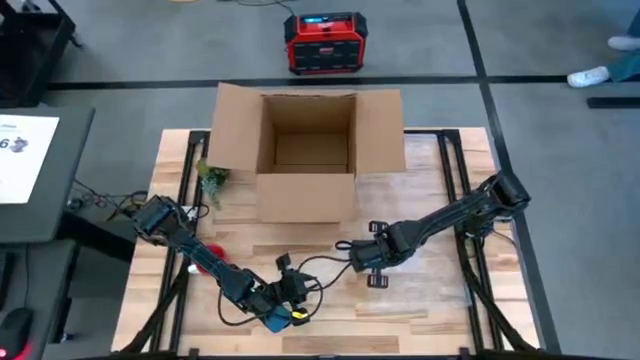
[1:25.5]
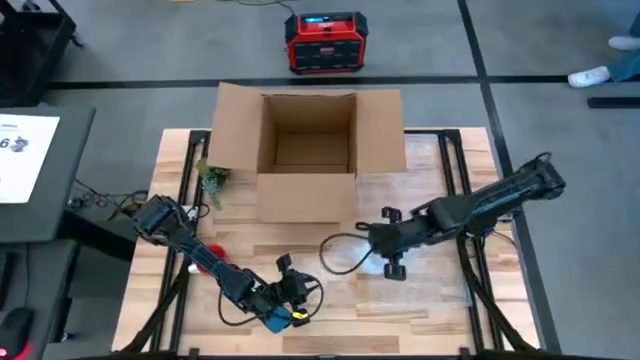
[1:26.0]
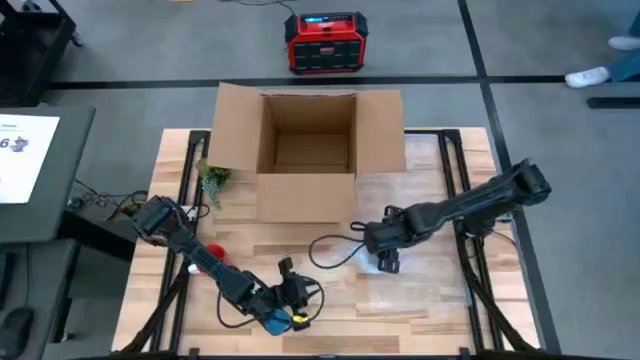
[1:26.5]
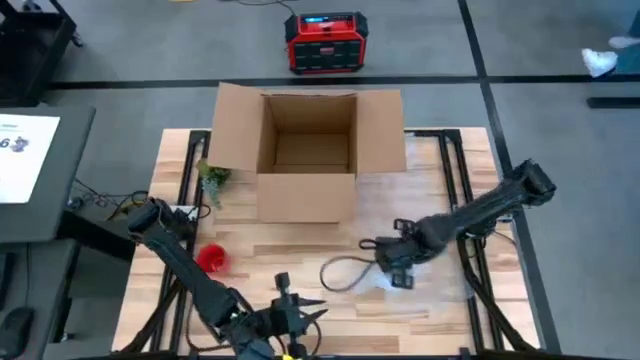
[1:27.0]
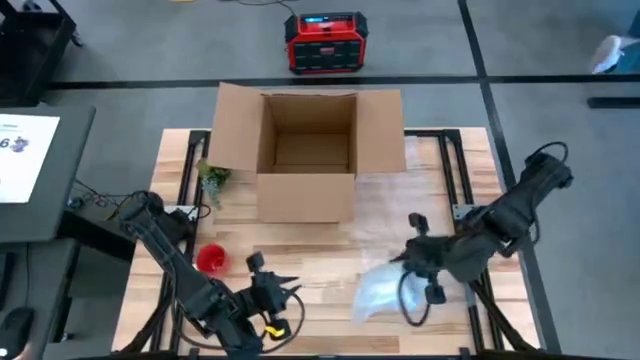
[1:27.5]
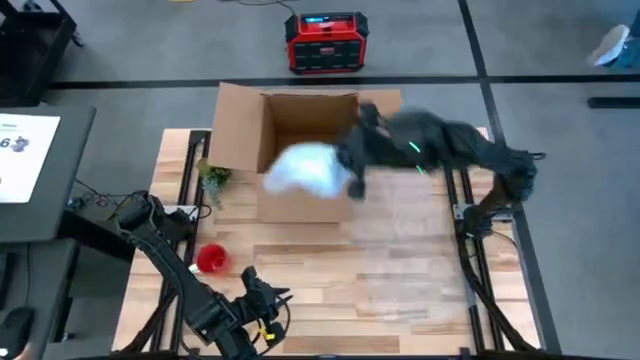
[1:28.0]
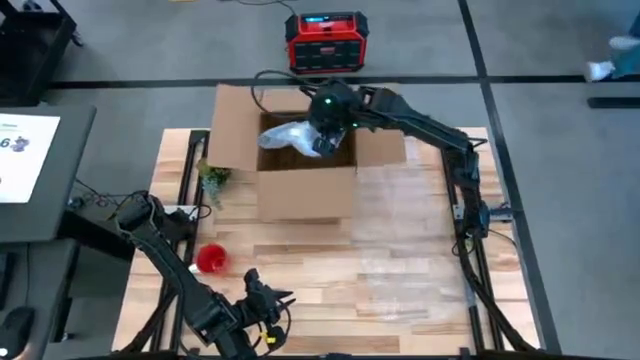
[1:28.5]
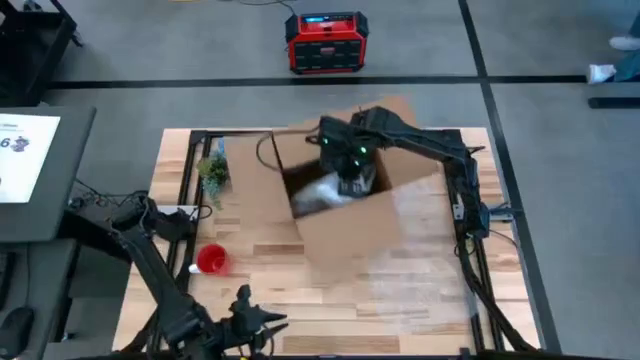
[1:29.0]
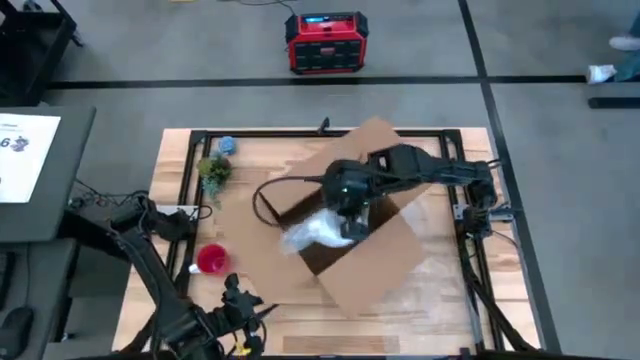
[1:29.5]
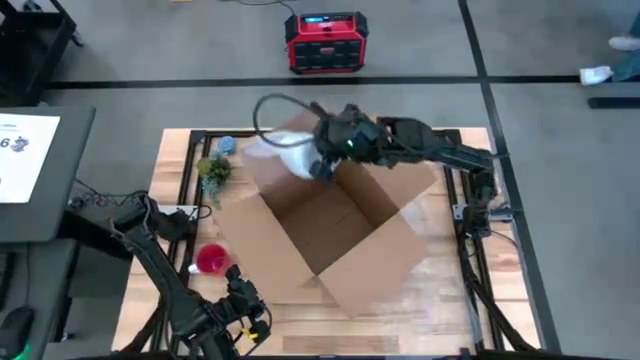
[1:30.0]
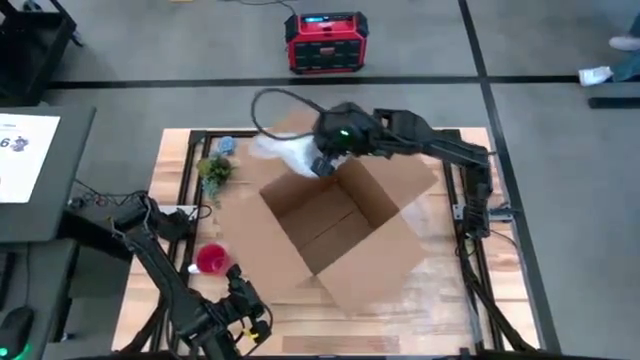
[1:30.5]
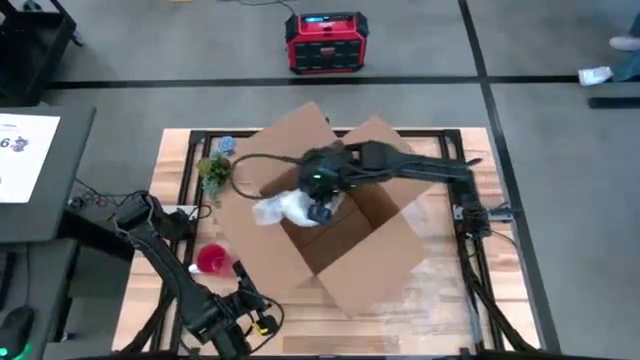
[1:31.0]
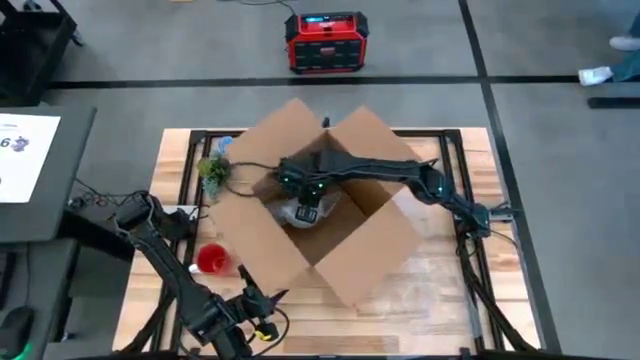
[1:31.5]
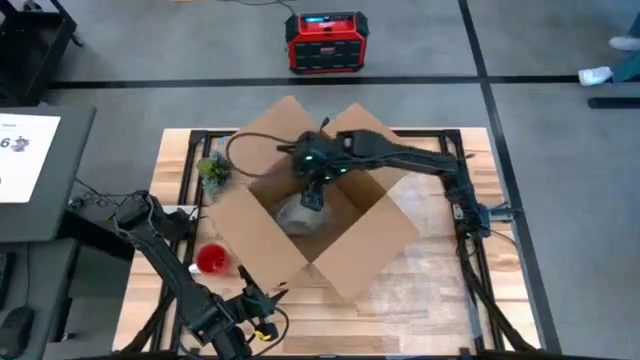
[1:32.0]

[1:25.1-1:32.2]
Task: wrap mug
Put the wrapped white mug into the box

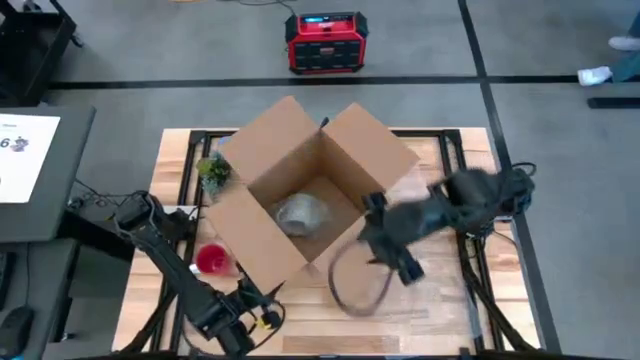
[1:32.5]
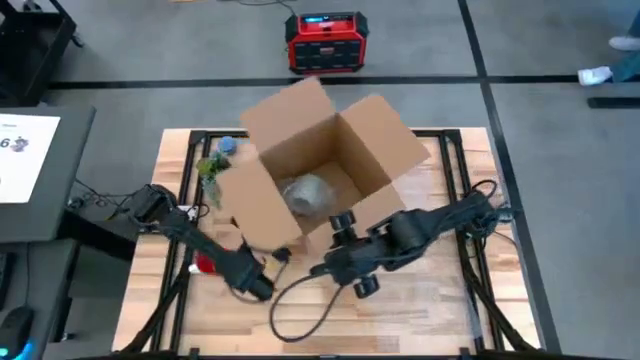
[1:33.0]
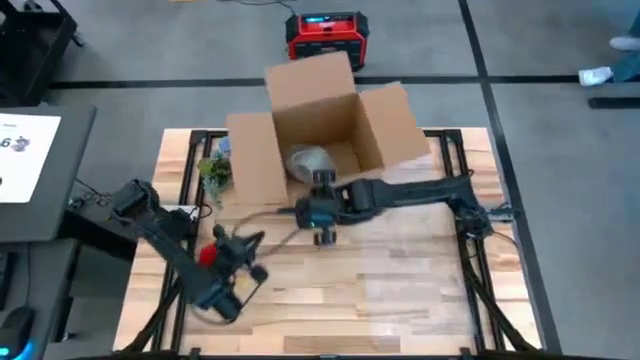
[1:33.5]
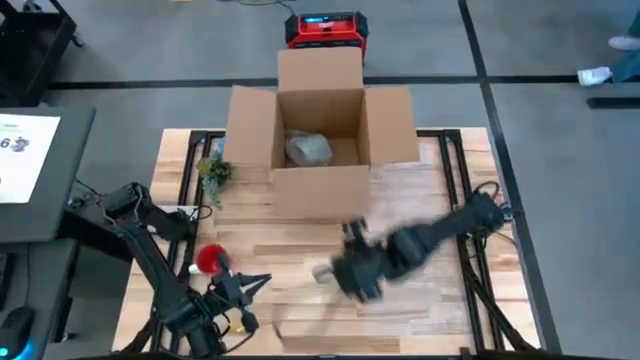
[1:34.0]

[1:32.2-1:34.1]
Move the box to the top

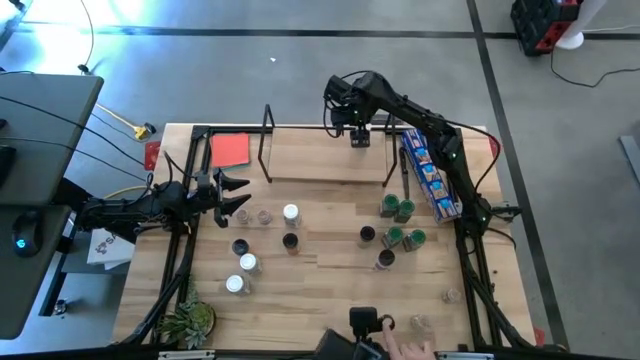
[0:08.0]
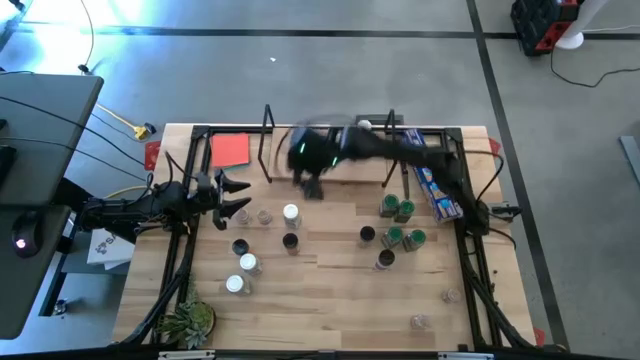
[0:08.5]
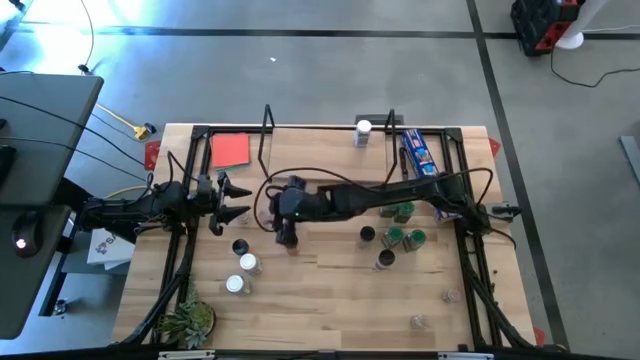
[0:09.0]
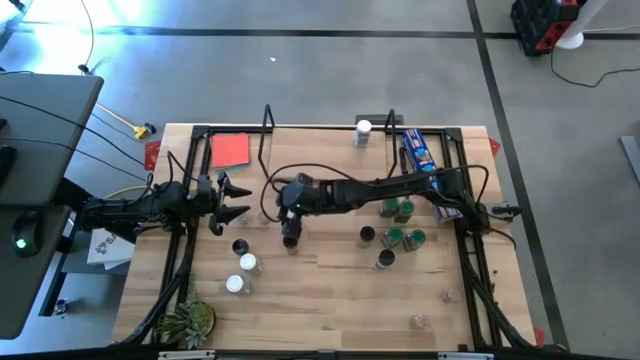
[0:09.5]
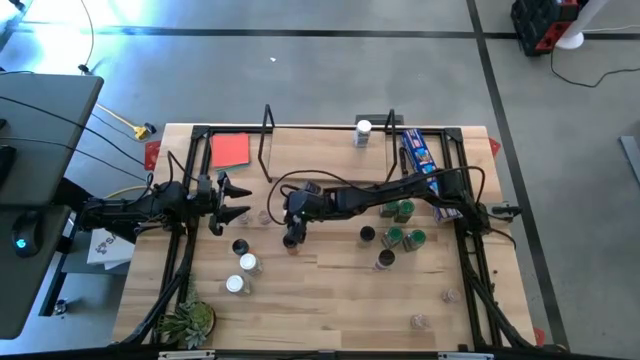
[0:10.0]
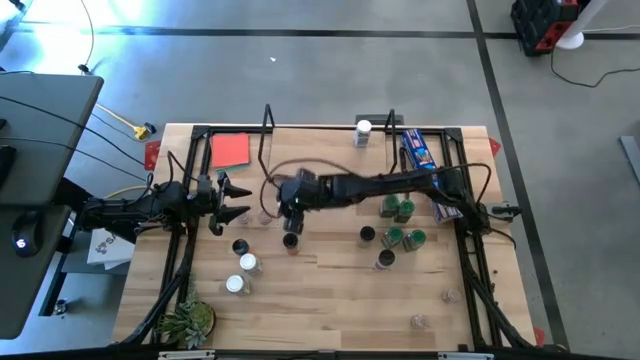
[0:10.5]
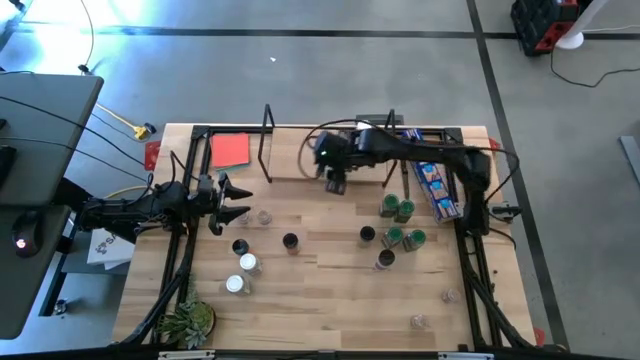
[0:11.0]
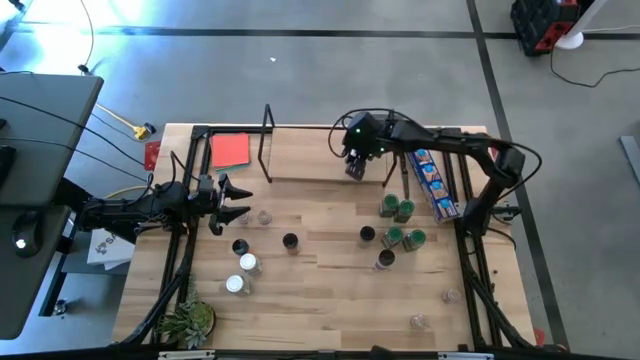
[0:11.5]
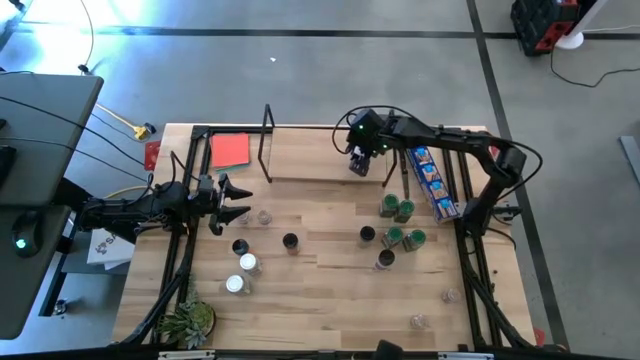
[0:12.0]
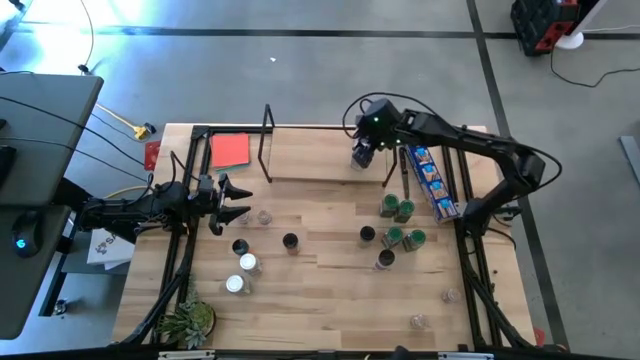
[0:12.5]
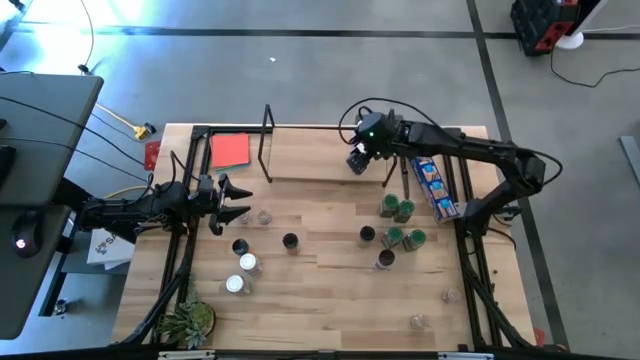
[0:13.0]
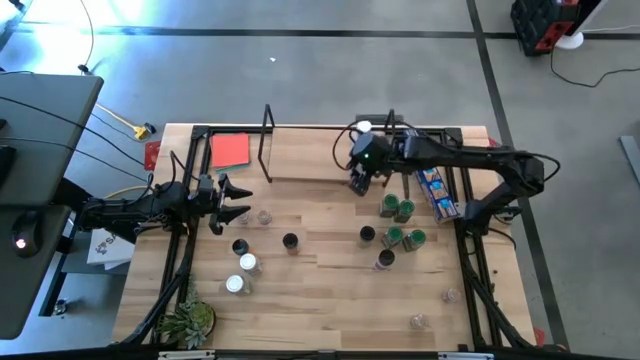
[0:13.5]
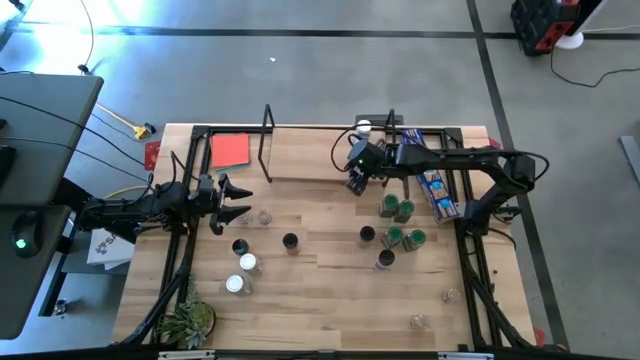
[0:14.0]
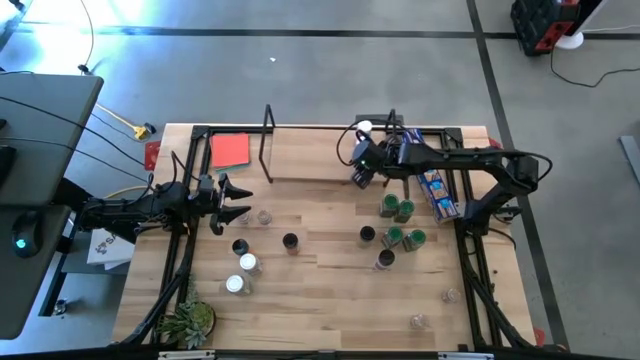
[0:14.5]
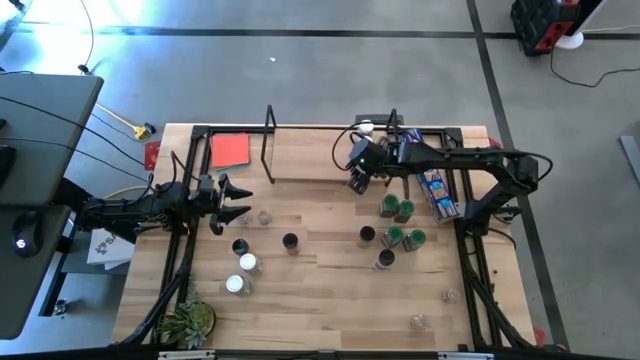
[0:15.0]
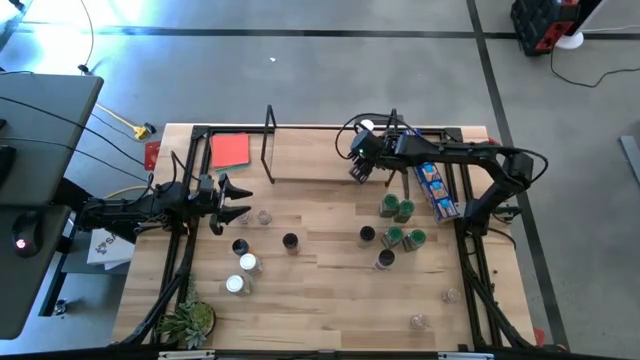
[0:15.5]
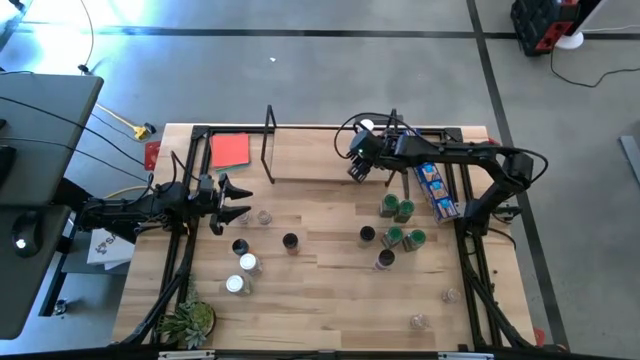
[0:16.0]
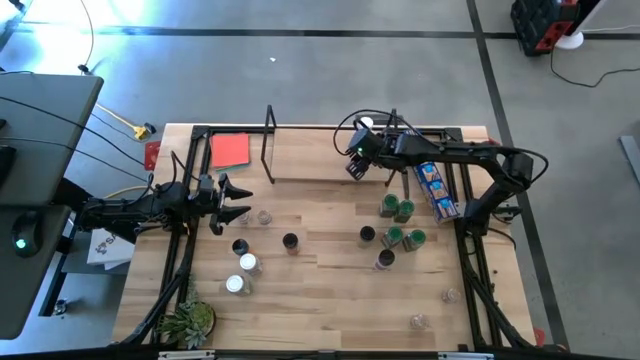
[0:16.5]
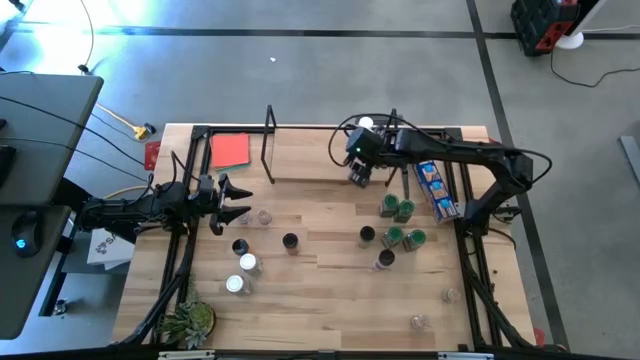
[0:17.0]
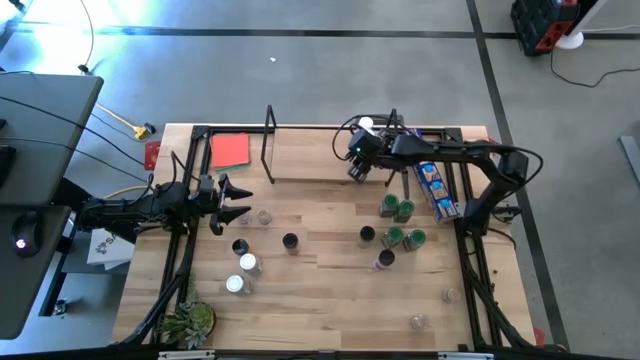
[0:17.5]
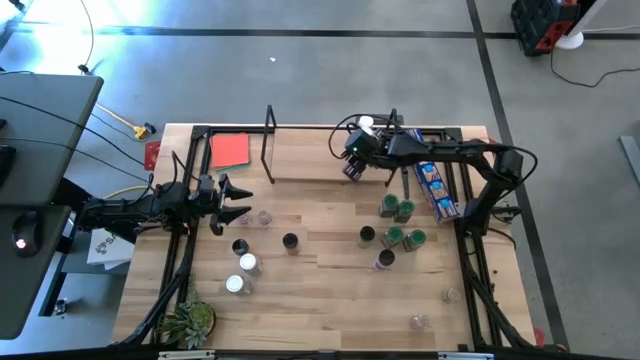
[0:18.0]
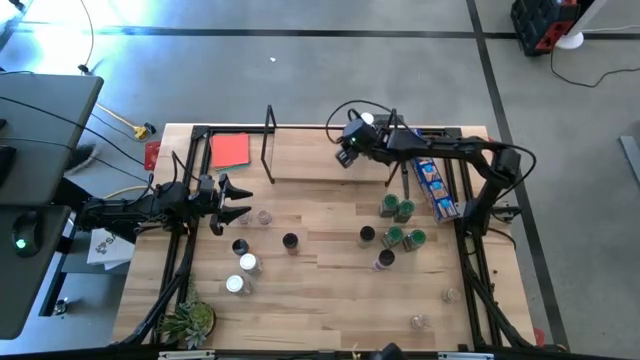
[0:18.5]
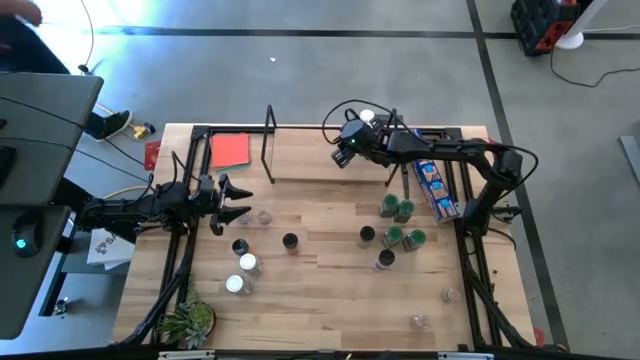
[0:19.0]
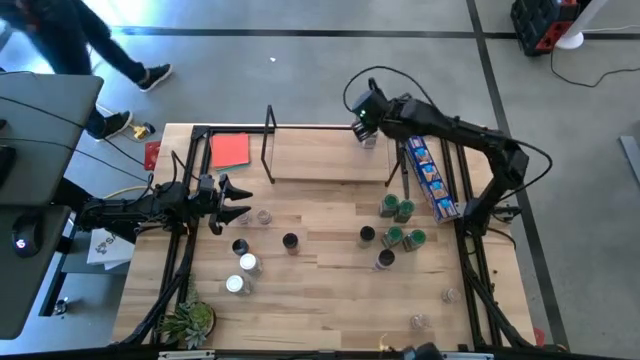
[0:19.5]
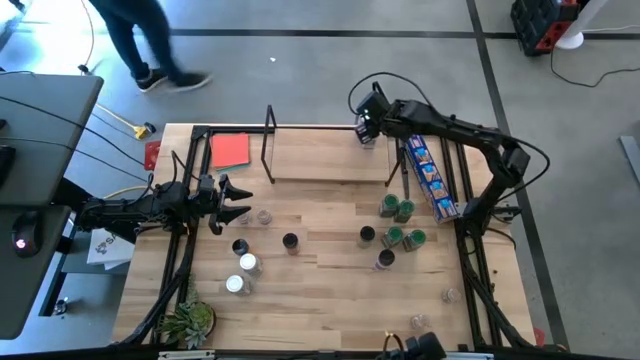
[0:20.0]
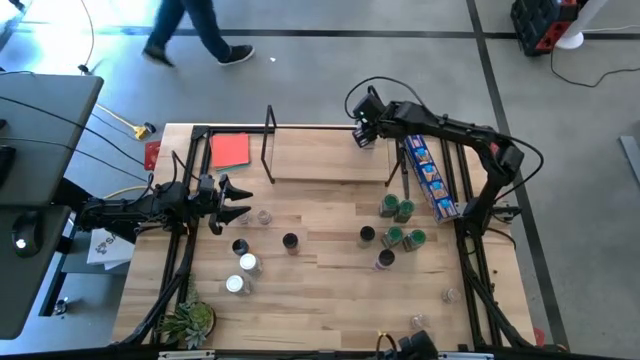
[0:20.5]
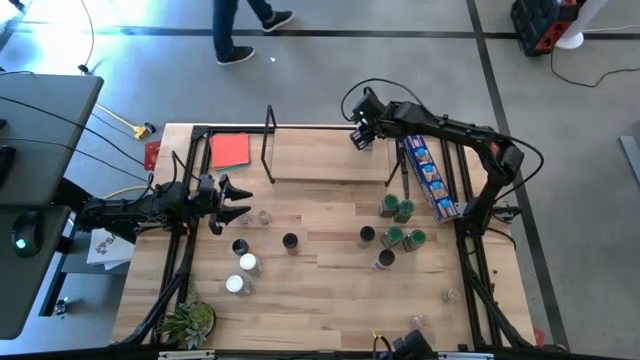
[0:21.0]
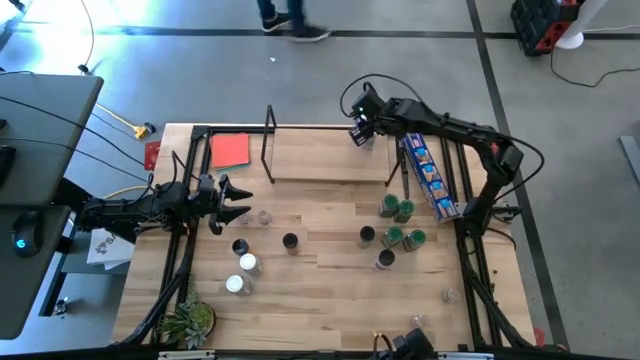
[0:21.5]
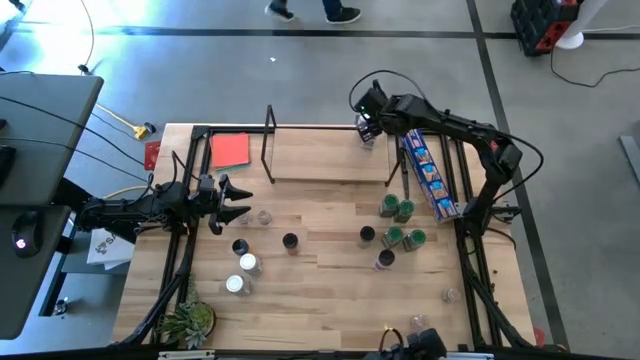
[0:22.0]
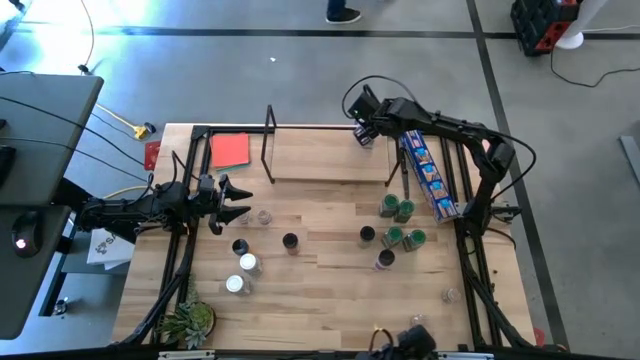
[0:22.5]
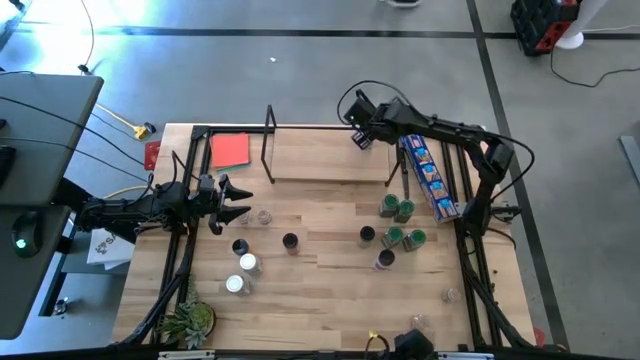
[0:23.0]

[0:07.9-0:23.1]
Task: Shelf spices
Put the top white seasoning bottle on the shelf aligned with the other white seasoning bottle
